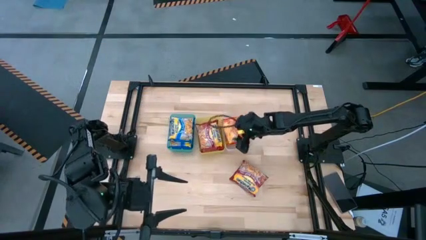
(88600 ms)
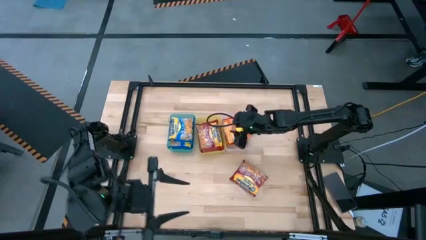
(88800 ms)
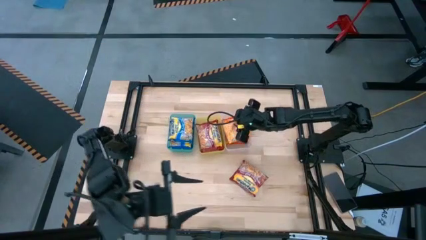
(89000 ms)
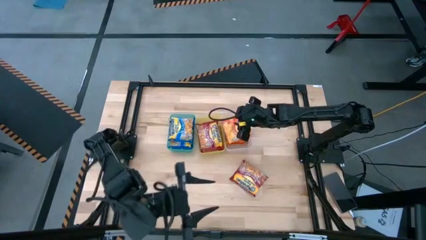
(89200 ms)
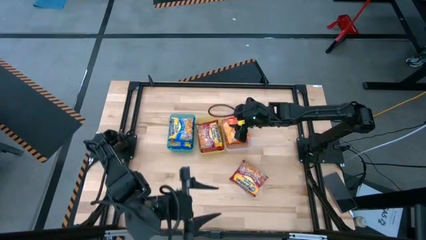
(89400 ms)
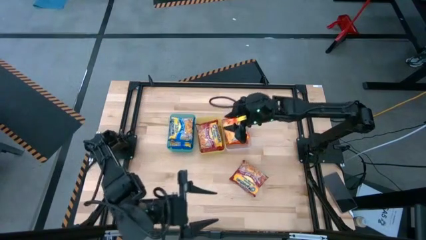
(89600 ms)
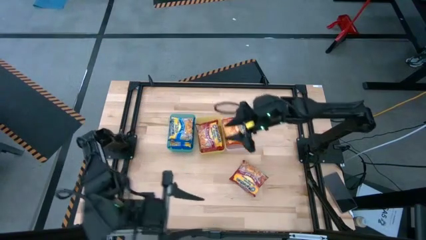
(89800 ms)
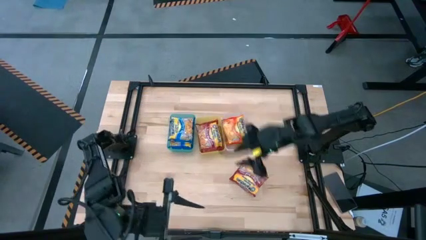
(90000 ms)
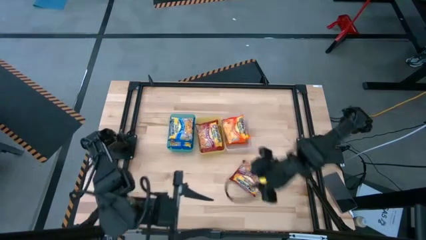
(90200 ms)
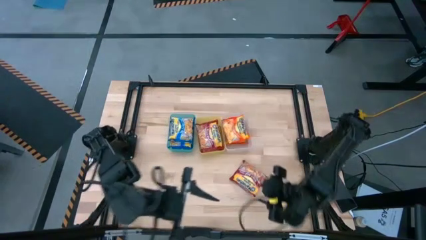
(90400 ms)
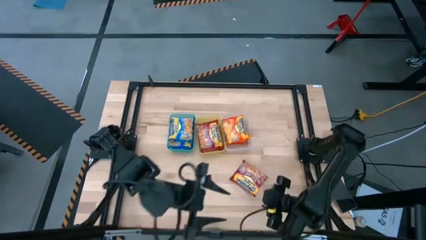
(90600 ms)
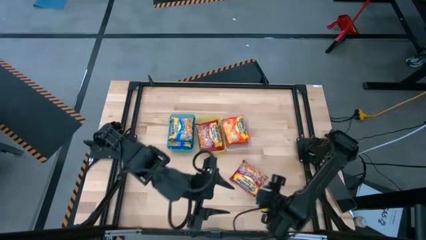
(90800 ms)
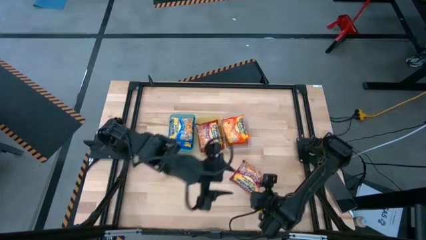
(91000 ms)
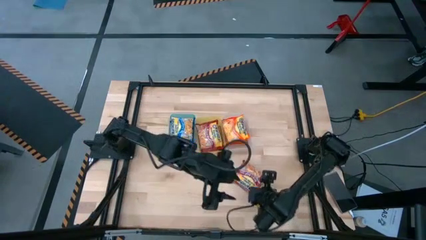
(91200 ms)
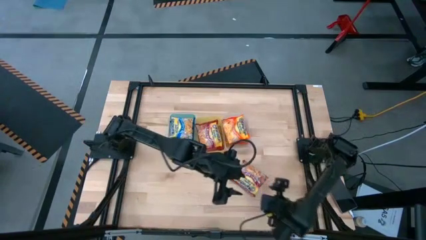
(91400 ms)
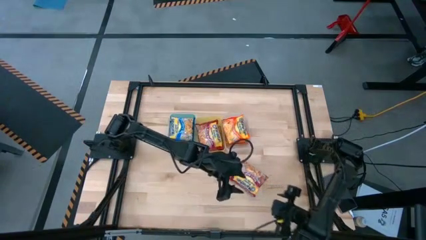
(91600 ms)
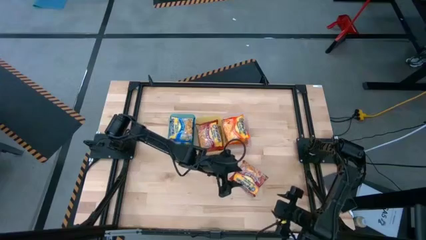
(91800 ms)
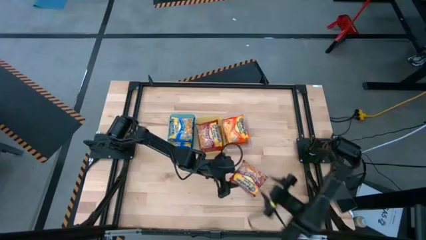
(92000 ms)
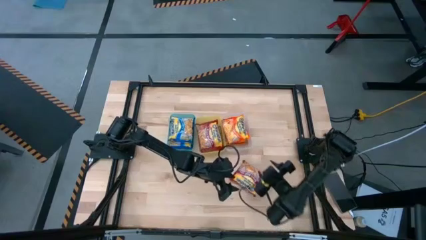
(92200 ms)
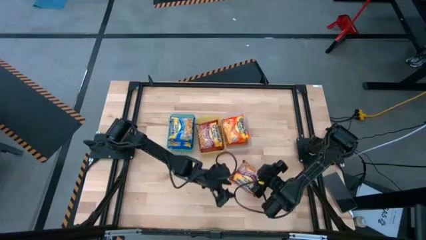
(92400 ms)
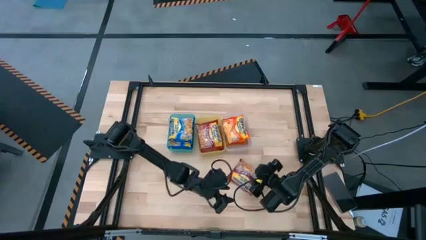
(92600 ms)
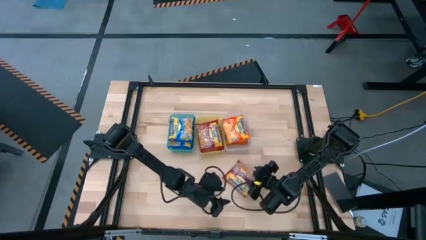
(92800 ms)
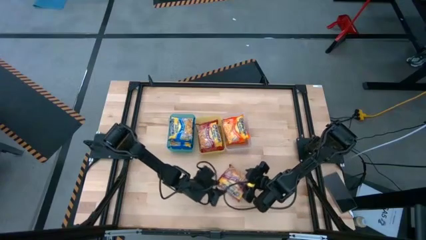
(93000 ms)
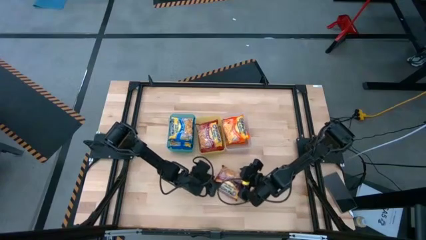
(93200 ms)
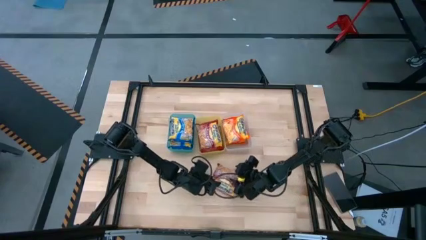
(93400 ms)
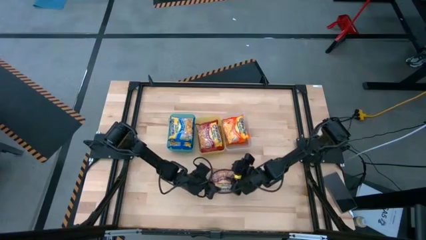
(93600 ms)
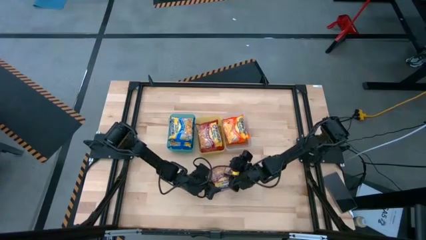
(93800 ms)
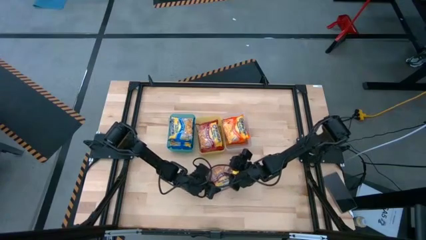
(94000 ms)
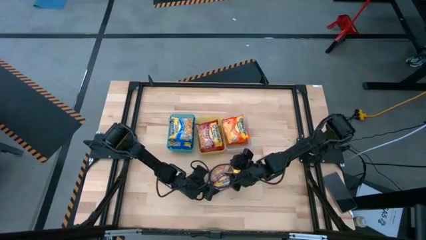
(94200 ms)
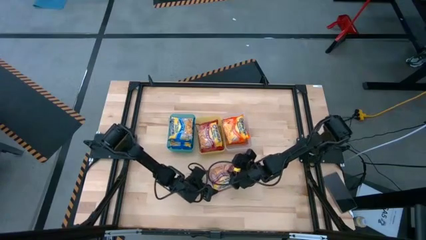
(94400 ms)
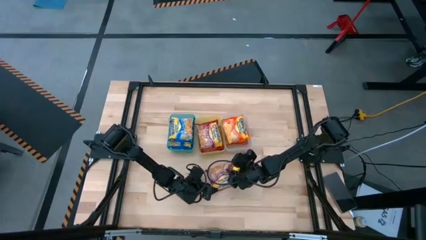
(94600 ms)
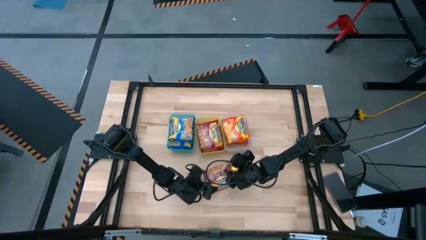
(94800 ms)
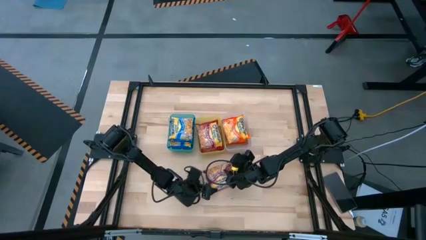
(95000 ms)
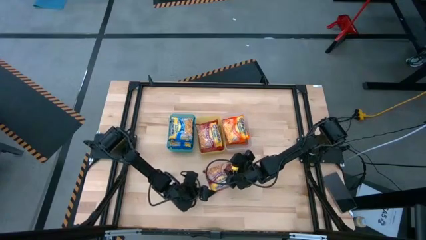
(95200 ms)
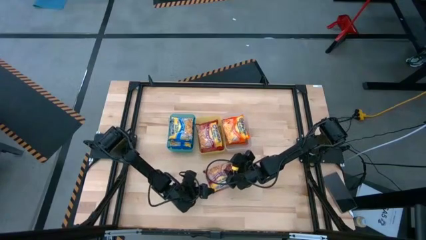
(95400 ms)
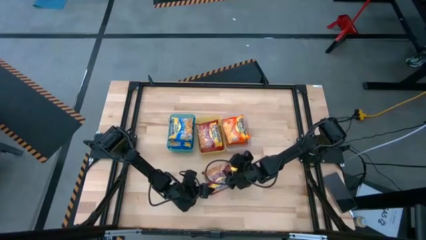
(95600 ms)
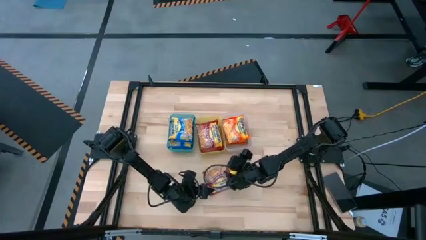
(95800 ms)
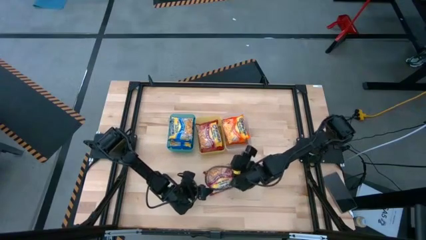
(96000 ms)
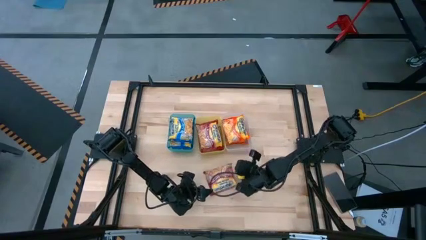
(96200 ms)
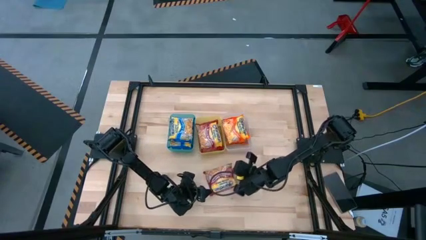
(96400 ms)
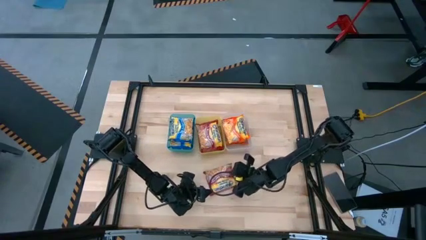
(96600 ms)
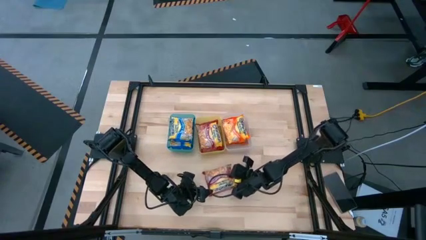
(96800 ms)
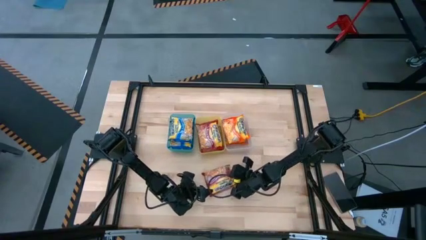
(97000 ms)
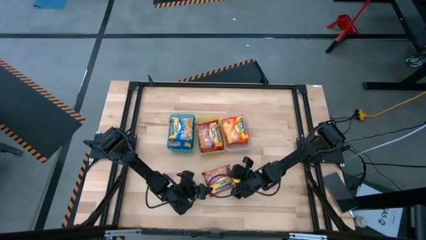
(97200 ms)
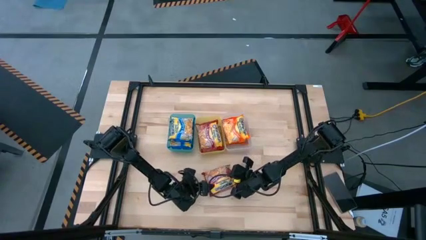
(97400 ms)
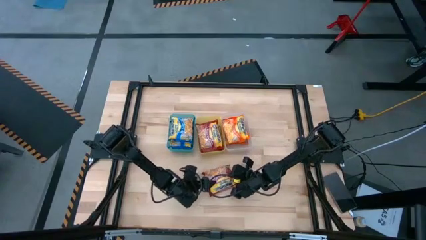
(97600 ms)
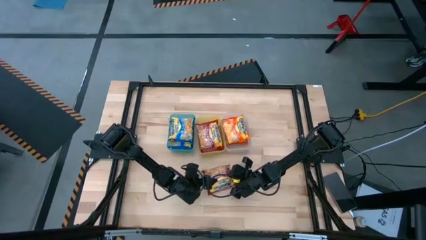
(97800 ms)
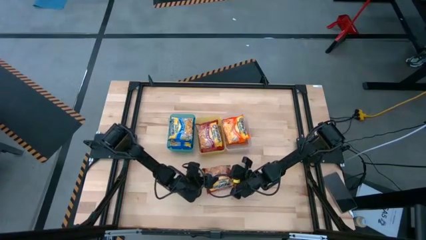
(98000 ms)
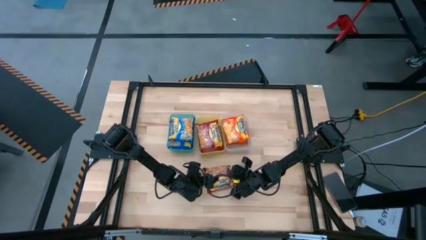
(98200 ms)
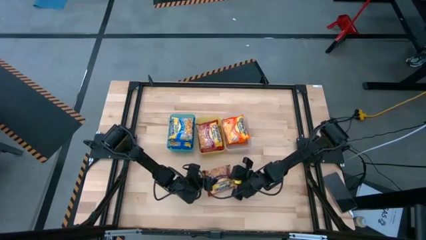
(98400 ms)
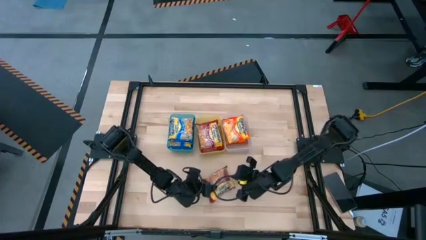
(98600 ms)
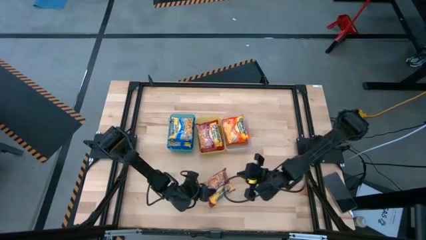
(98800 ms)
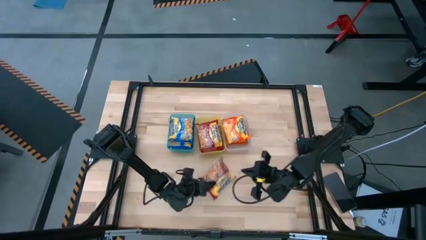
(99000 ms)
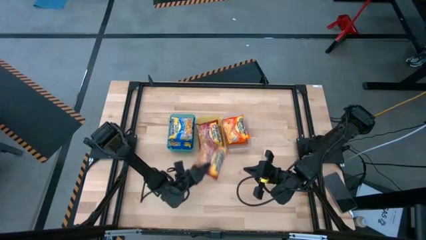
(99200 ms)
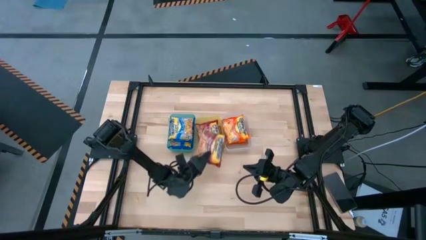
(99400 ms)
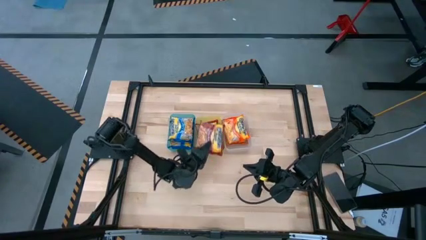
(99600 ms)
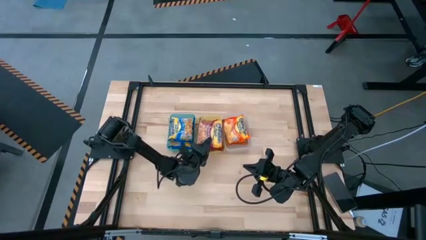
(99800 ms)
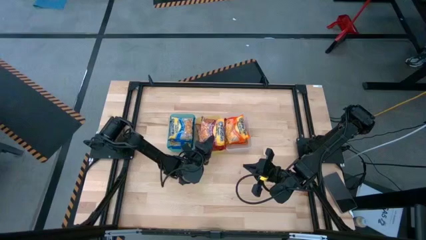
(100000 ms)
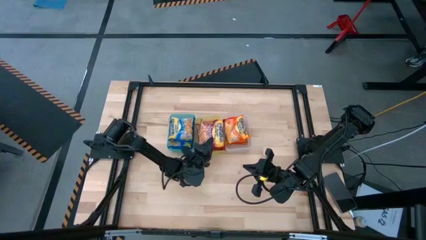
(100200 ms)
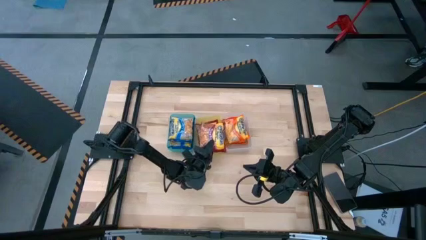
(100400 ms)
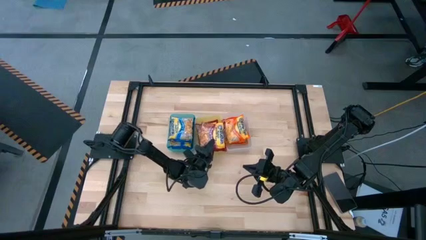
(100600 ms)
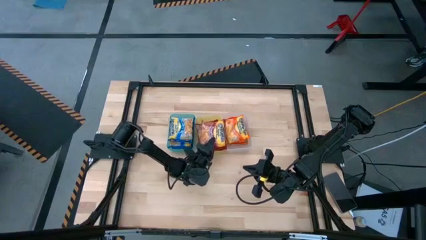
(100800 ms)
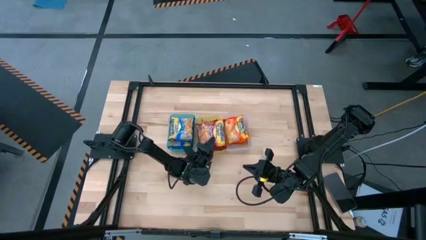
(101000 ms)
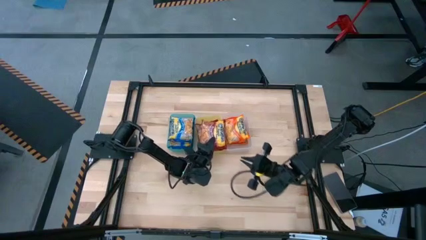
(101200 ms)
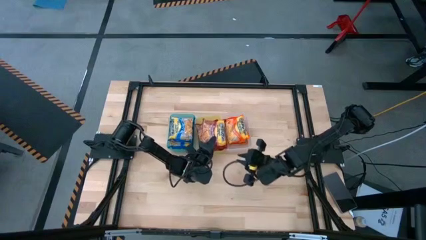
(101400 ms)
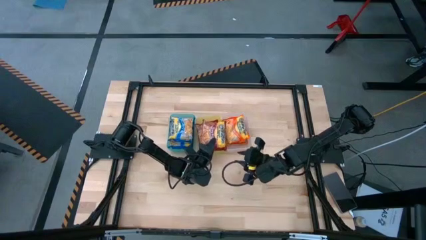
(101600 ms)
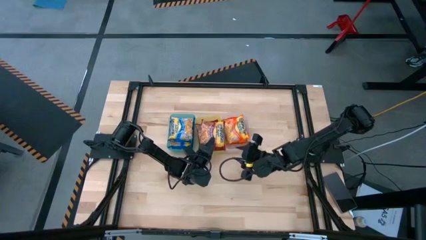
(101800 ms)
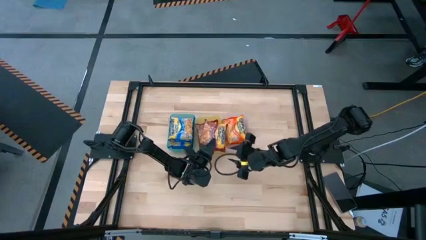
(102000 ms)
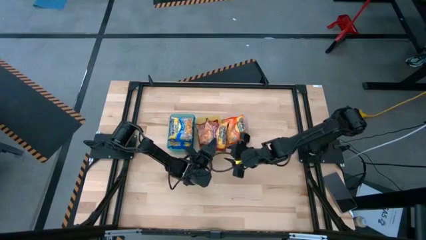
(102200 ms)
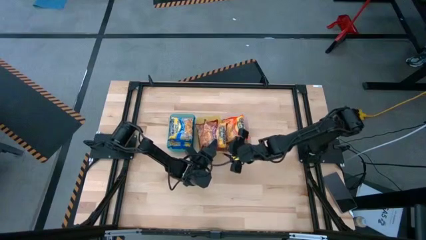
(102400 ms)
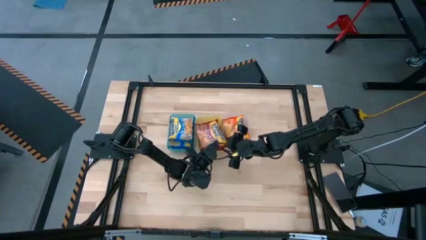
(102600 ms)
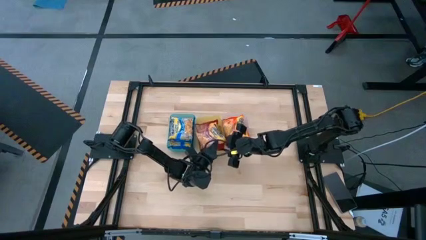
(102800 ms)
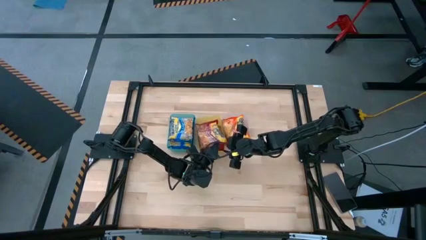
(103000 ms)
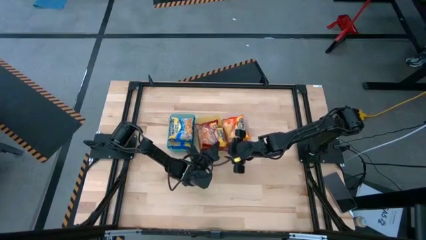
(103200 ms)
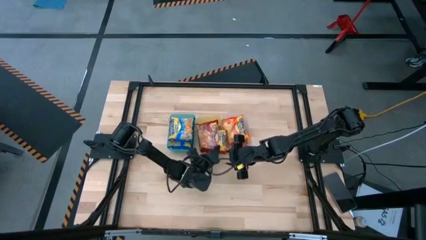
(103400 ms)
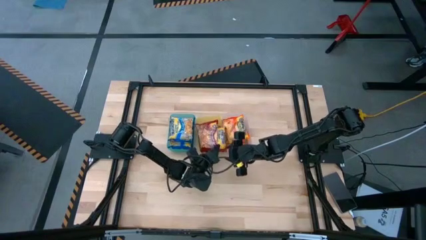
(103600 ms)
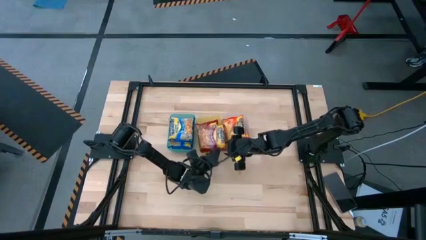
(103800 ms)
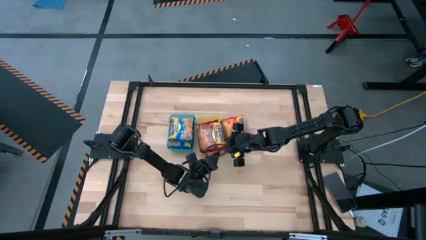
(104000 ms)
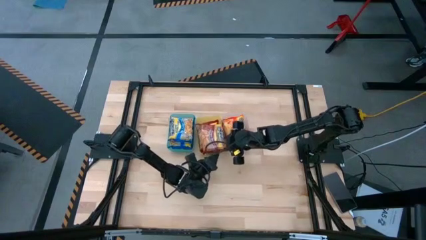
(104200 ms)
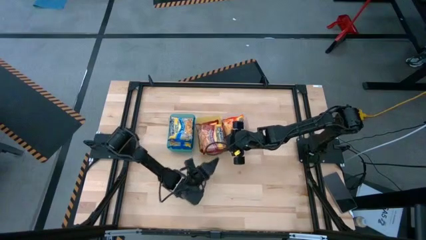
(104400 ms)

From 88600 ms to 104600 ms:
Task: Sort Maruchan noodles
Put the red bag into the yellow bin

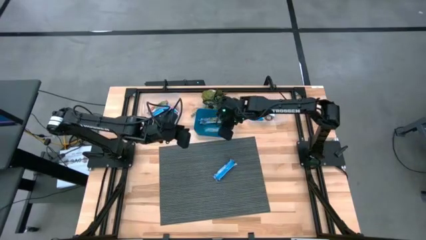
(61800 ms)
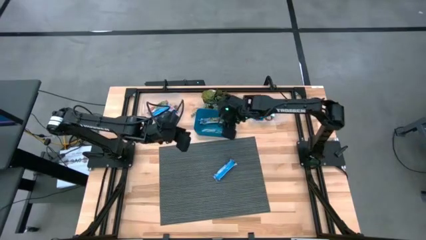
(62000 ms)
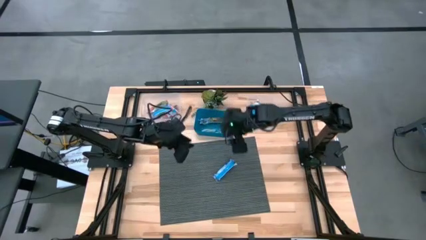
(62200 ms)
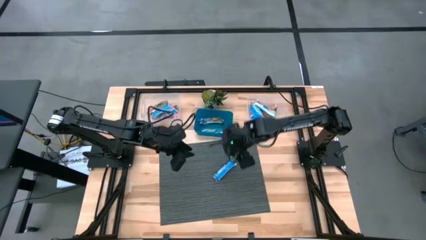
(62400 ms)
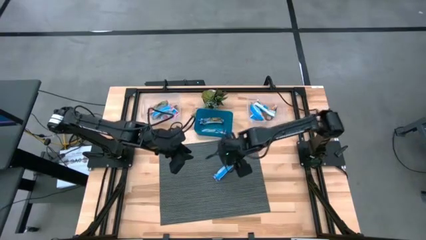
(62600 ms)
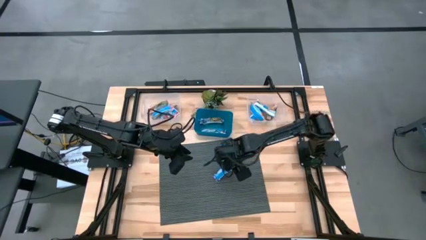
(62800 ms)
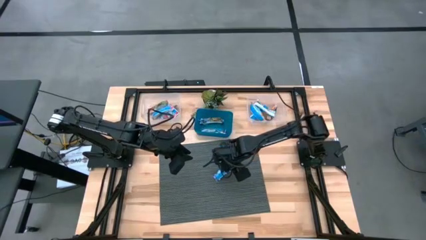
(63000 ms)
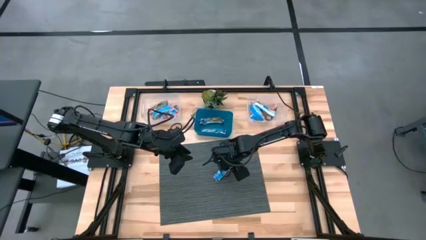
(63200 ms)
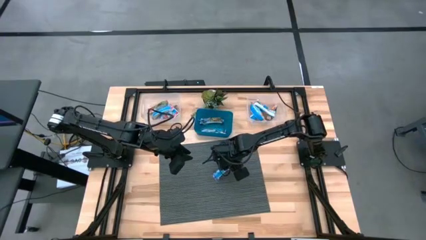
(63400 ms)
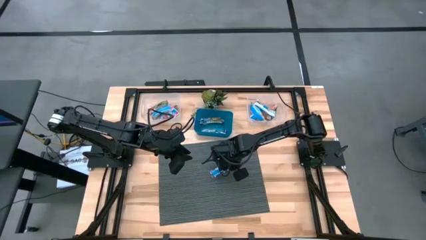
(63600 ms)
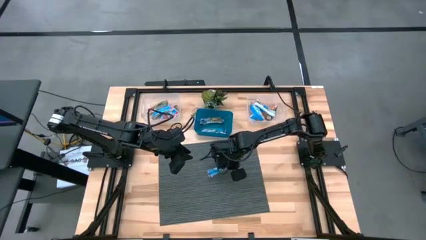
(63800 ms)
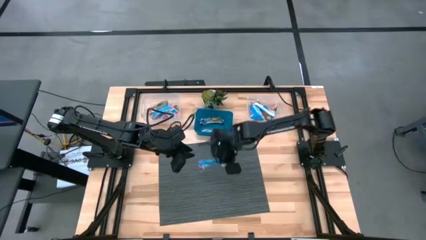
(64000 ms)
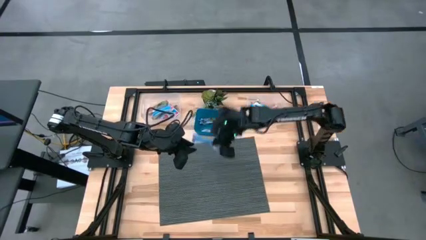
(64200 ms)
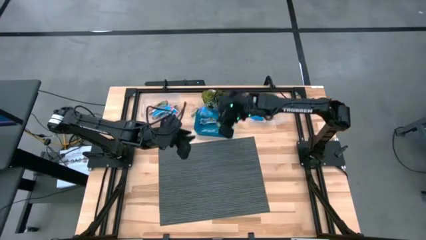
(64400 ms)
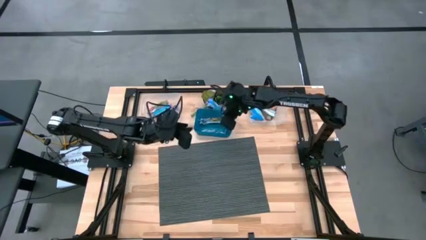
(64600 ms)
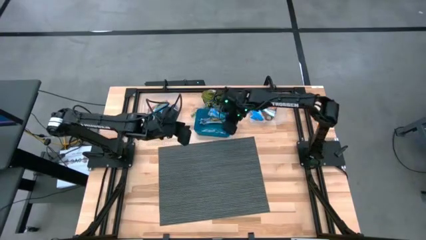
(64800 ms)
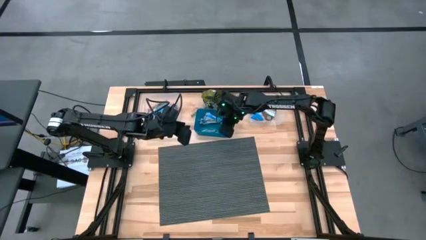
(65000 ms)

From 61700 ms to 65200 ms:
Task: Pick and place Granola Bars by type
Put the blue granola bar into the blue bin
